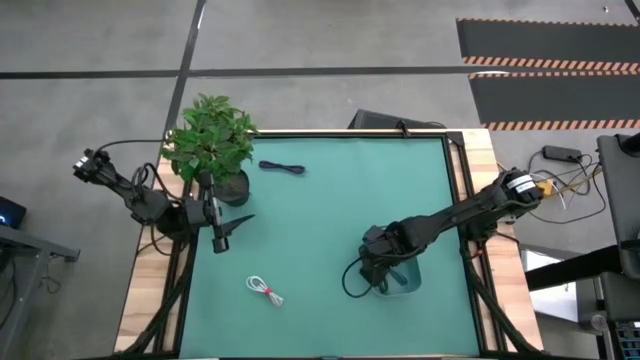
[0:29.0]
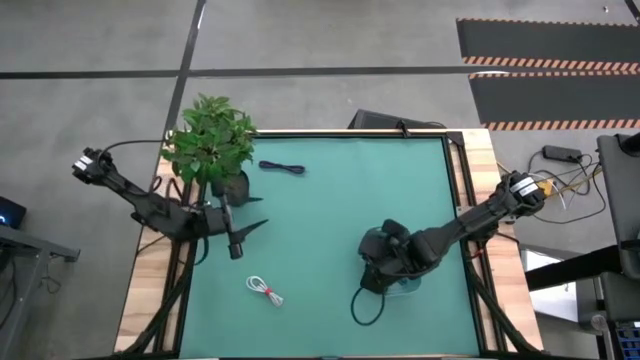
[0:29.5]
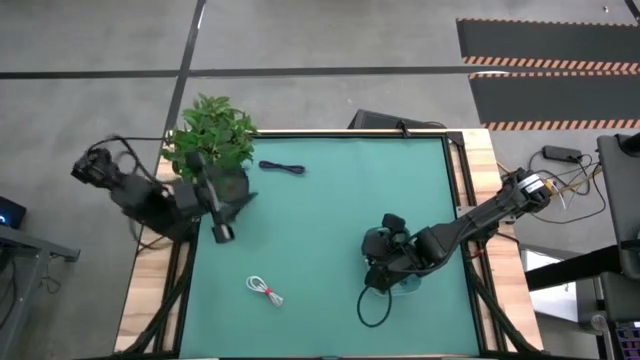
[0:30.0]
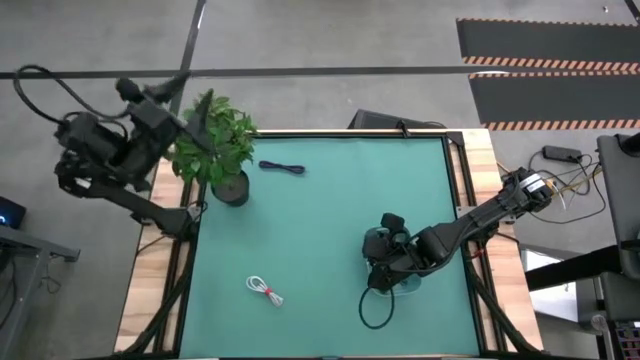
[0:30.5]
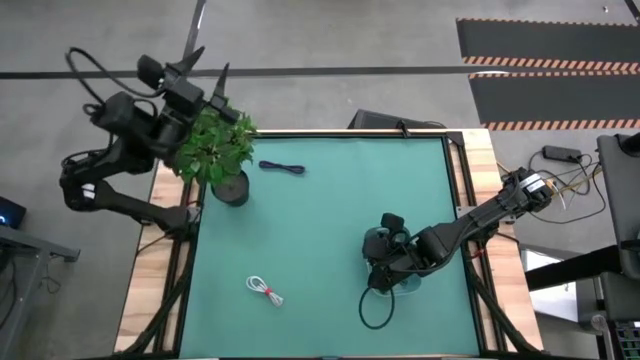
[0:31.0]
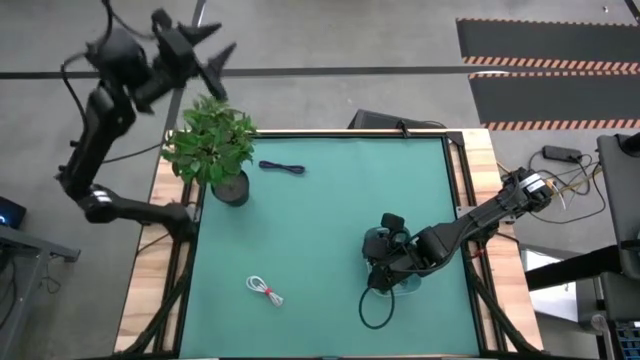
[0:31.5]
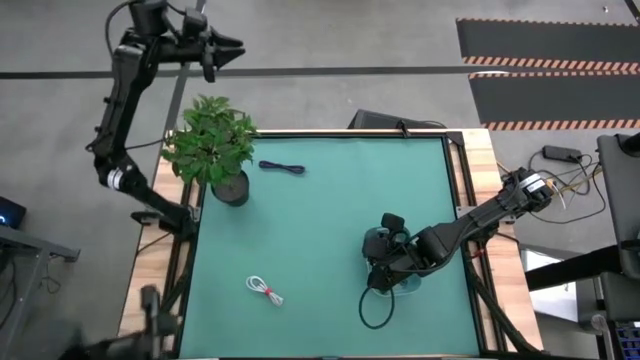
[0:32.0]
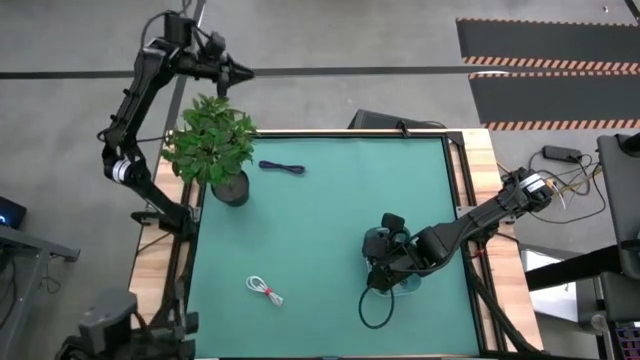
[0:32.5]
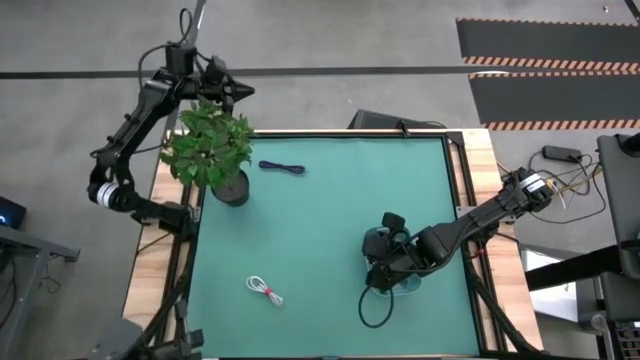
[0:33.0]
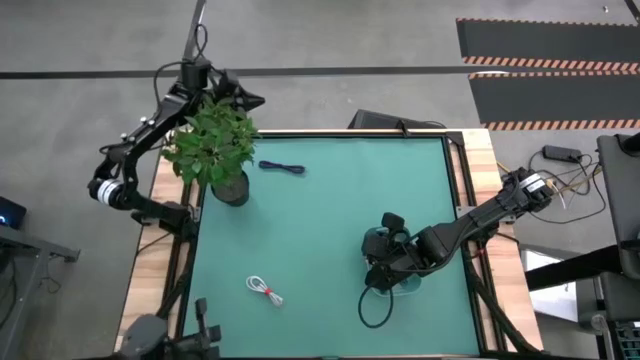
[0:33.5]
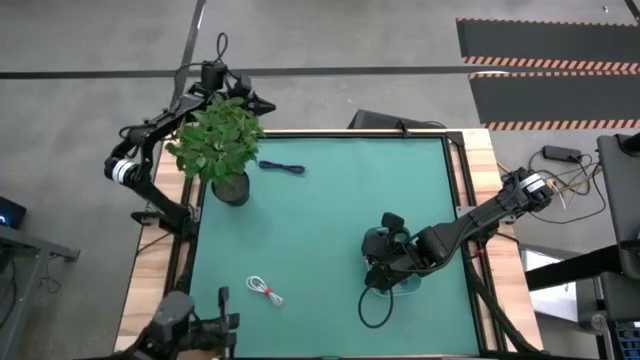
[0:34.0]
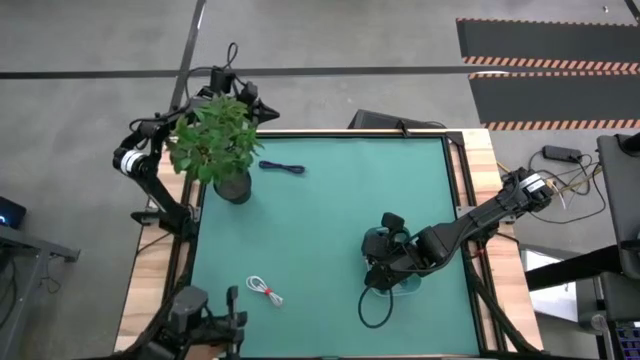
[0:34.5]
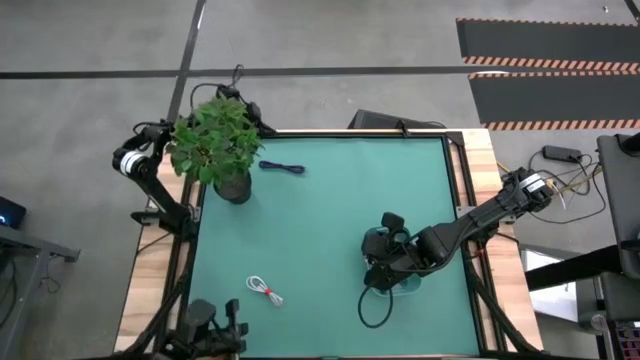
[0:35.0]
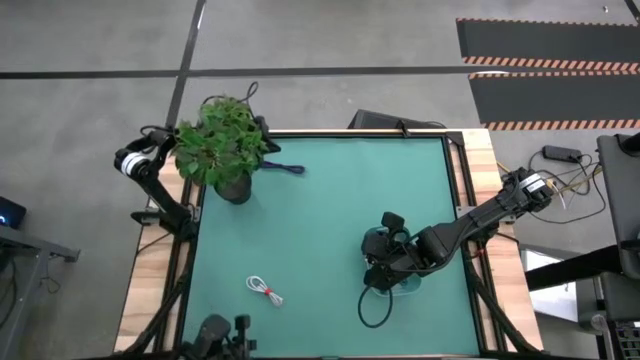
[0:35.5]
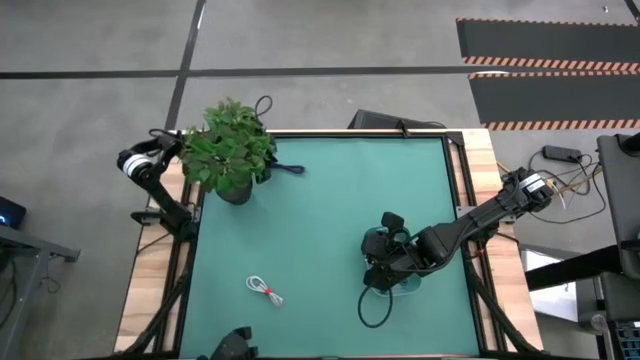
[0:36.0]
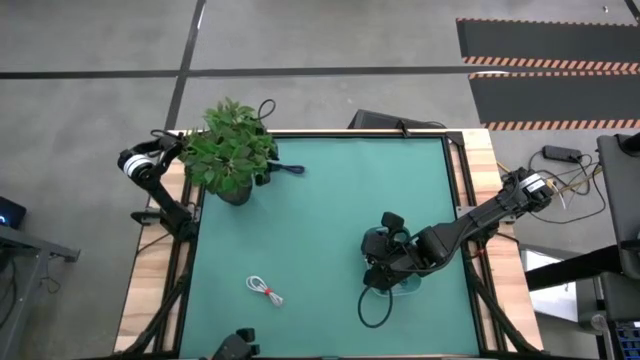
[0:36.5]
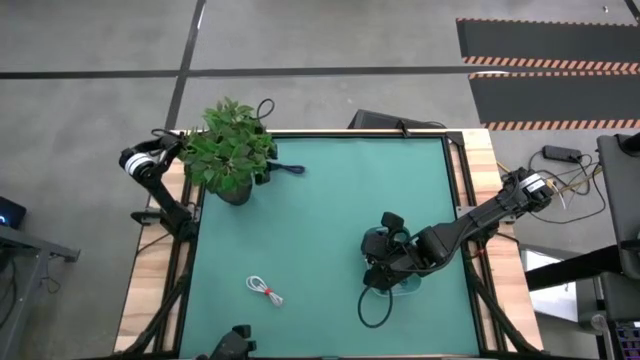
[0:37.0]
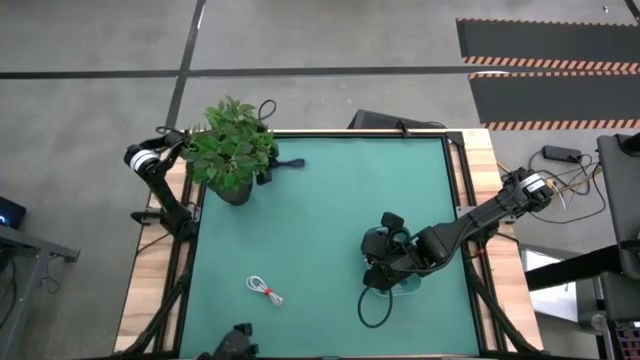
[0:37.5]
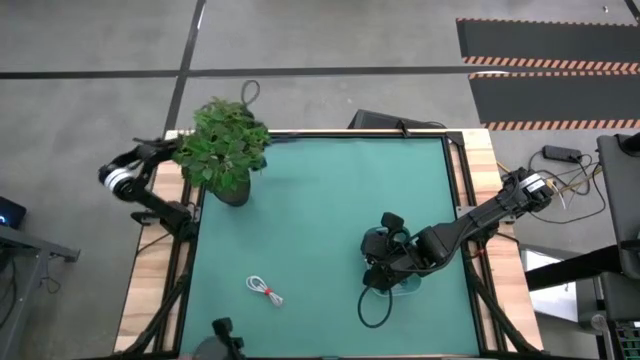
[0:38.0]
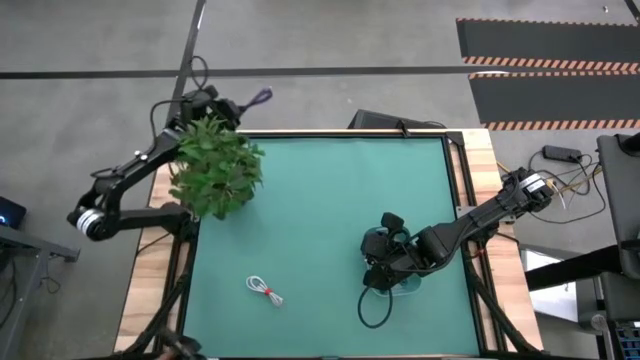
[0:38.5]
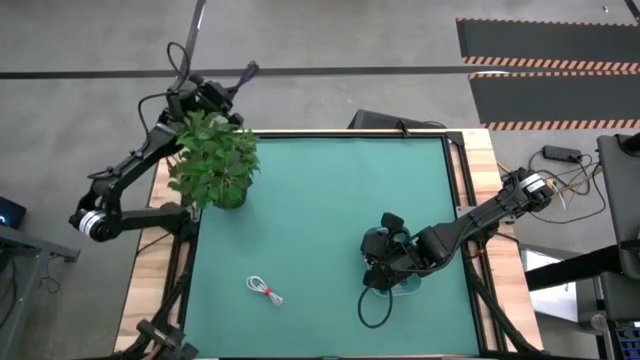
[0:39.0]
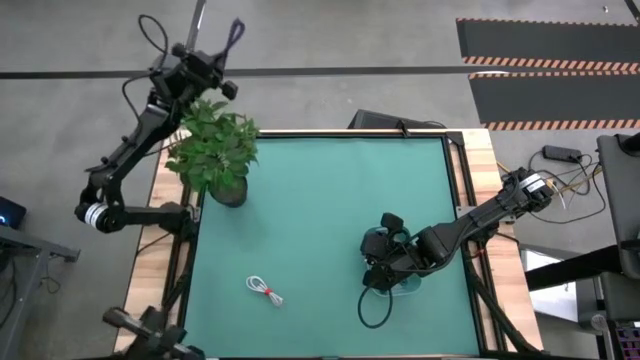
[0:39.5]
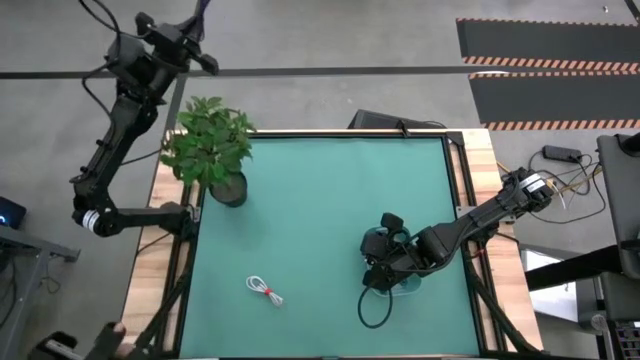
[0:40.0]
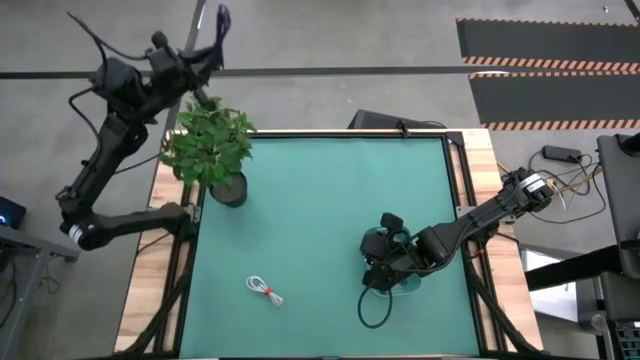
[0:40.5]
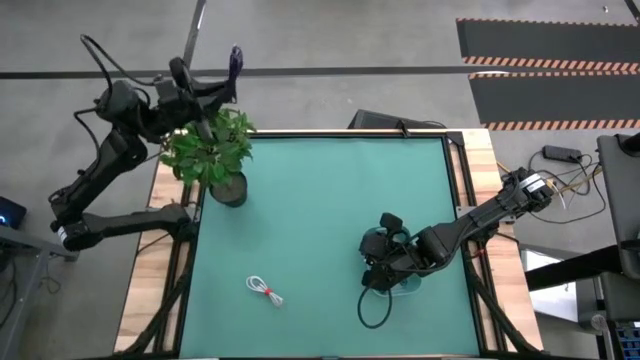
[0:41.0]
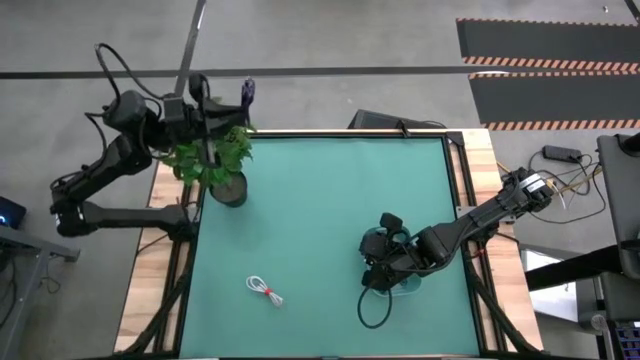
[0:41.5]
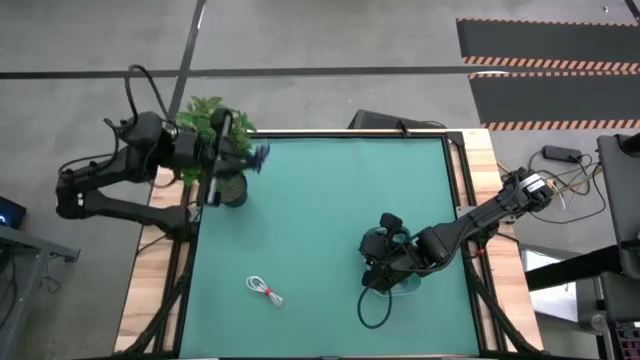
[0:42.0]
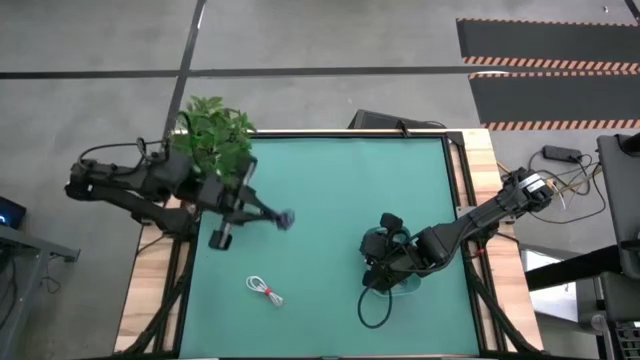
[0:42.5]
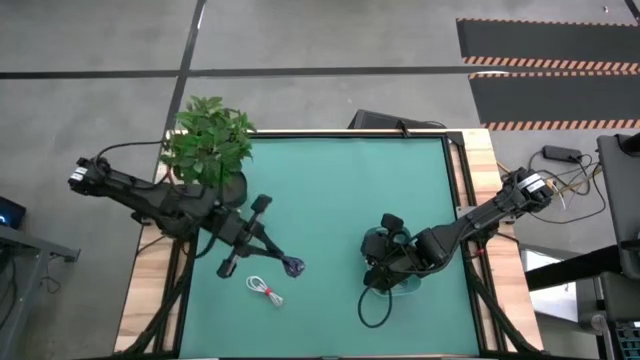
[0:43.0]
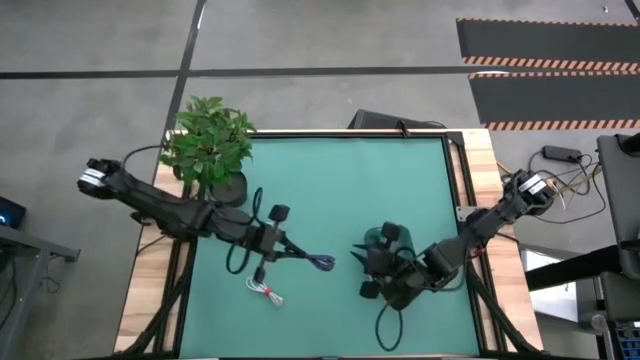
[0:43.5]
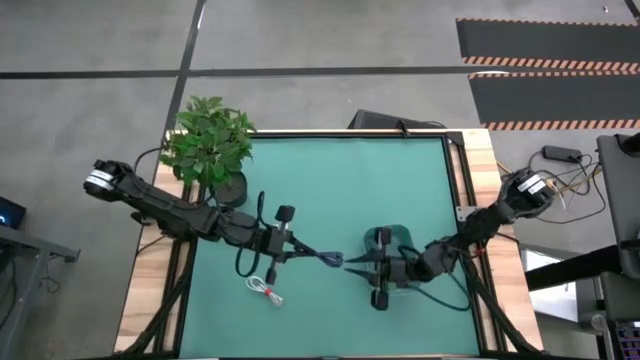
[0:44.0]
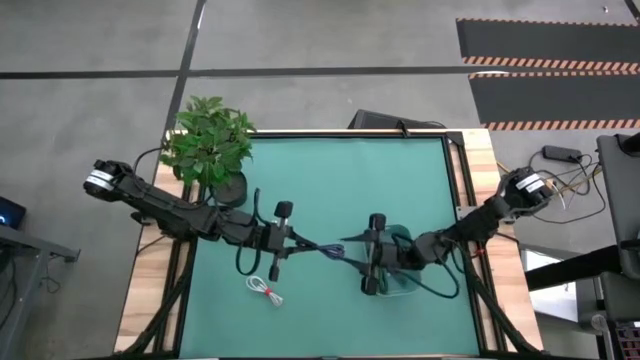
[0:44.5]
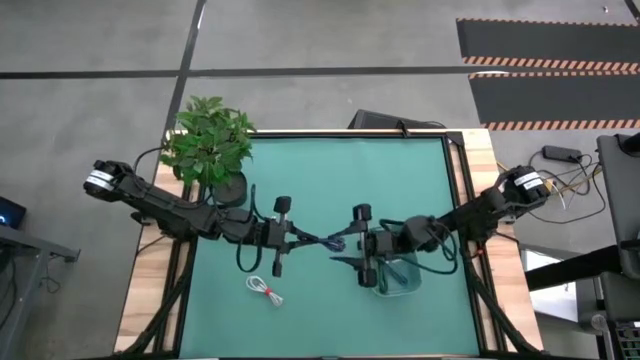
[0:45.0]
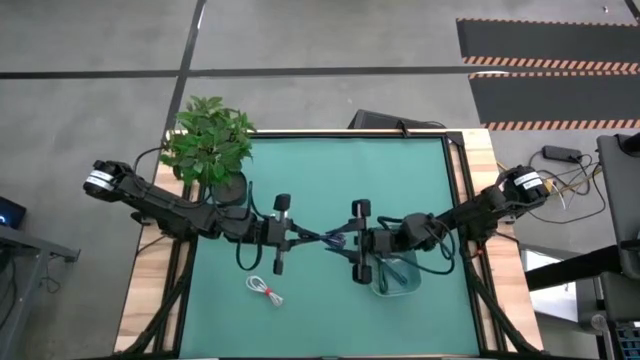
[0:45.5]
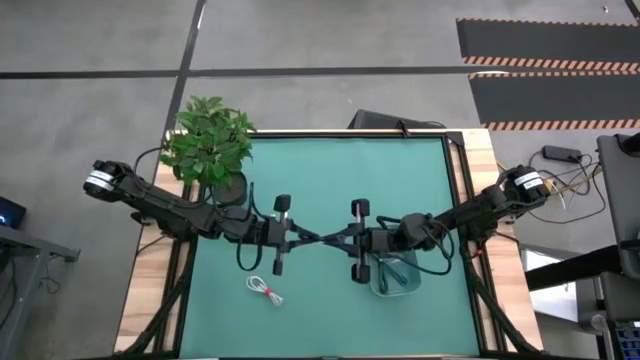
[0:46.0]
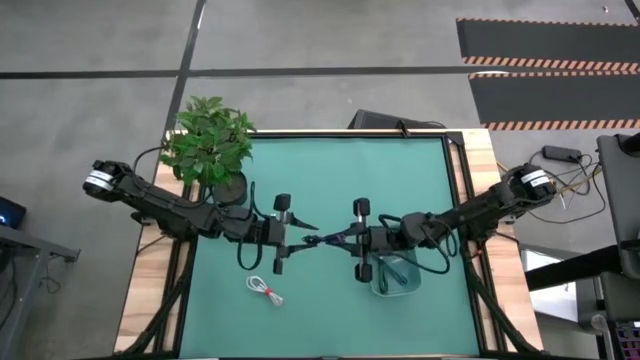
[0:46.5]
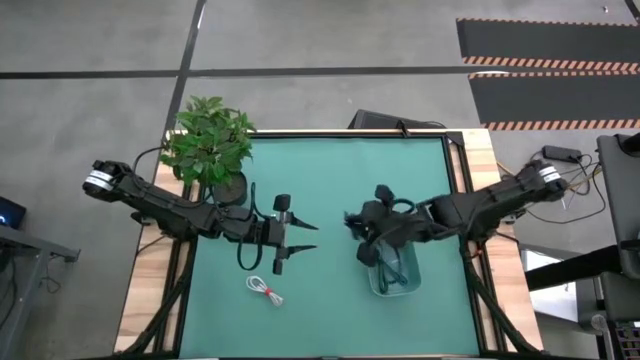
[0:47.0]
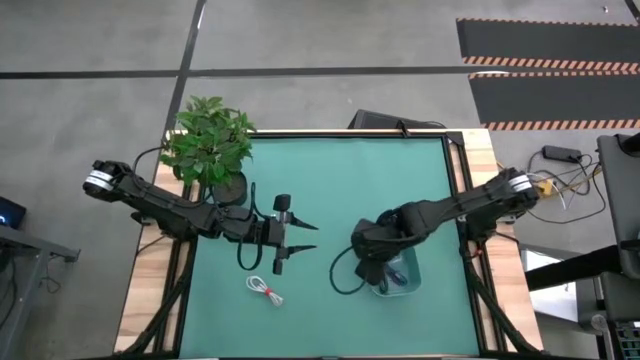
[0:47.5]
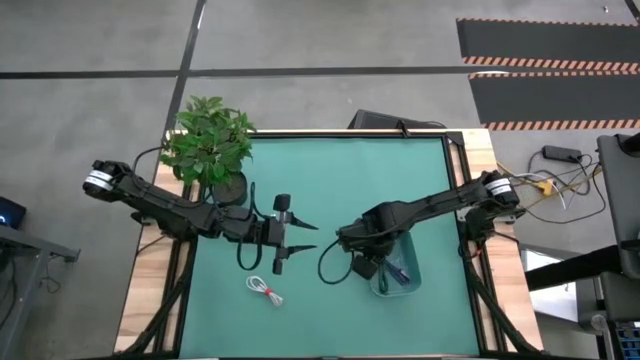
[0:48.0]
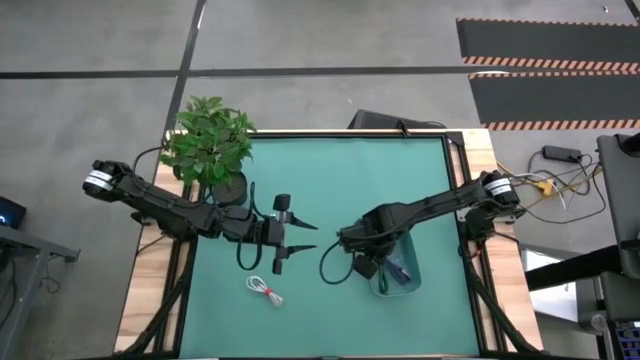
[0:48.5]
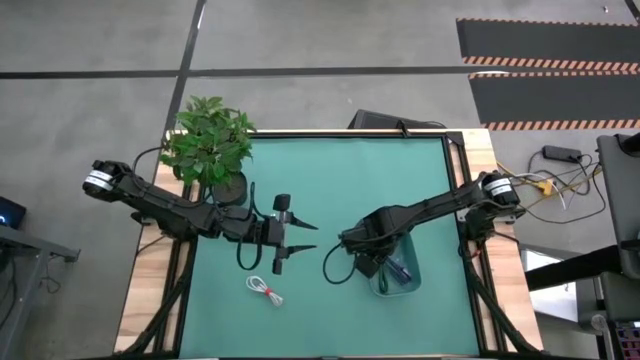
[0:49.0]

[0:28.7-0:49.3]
Task: Pick and place USB-C Cables
Put the violet charger cable into the blue bin

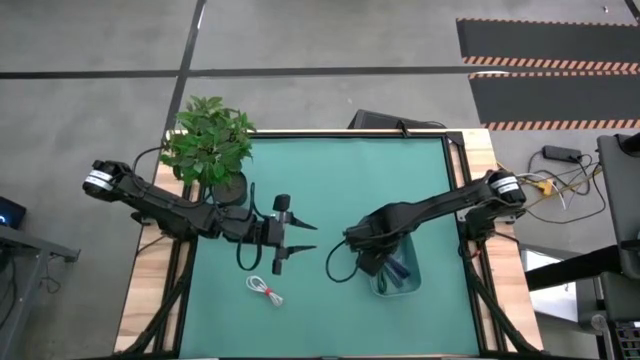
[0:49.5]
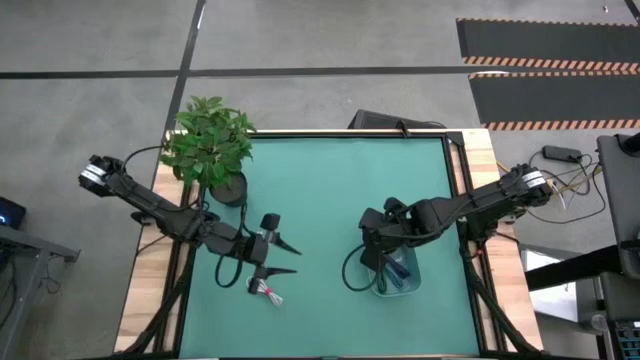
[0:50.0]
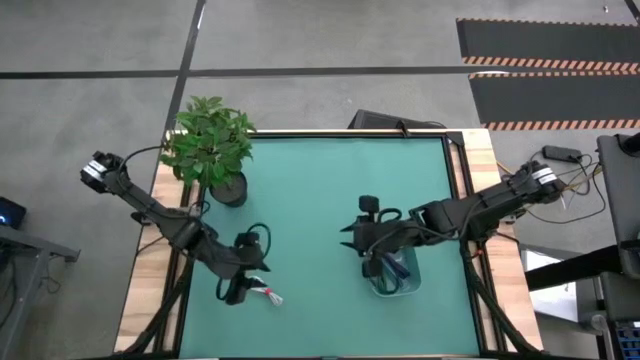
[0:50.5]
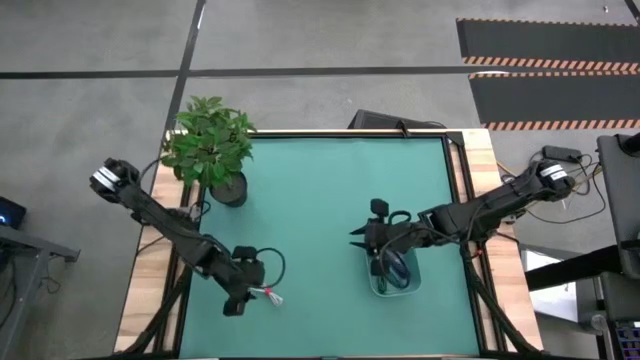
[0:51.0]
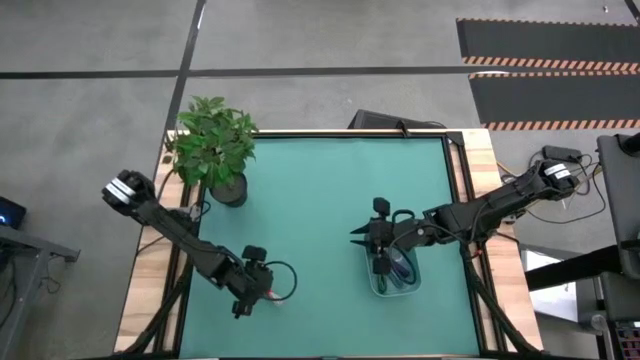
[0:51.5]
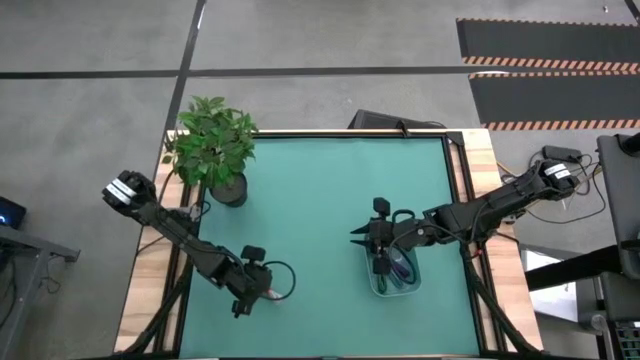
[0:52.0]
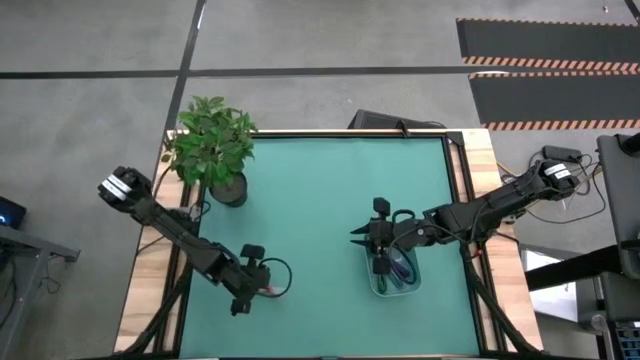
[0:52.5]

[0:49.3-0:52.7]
Put the white charger cable into the blue bin
